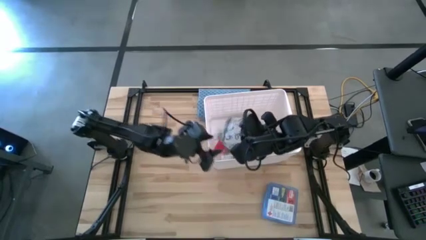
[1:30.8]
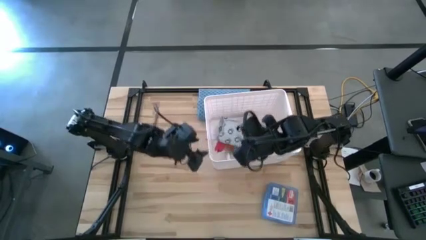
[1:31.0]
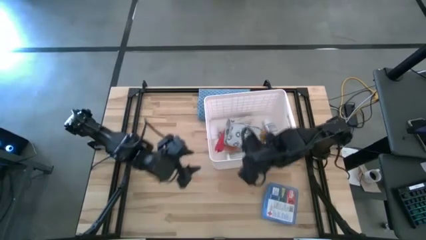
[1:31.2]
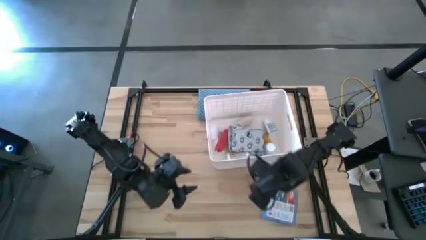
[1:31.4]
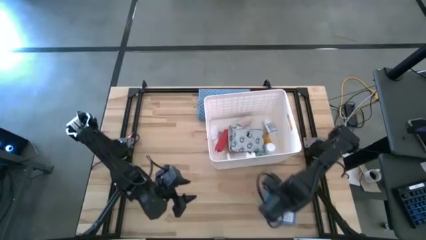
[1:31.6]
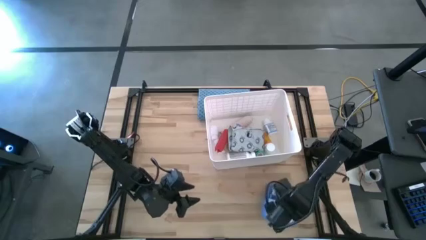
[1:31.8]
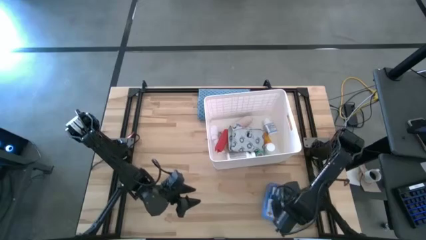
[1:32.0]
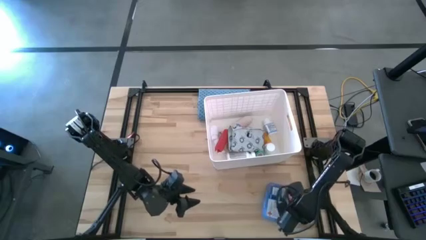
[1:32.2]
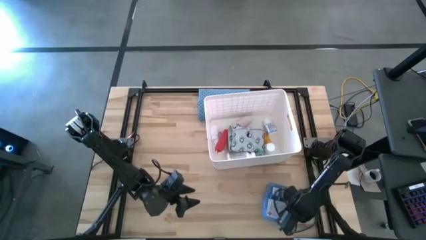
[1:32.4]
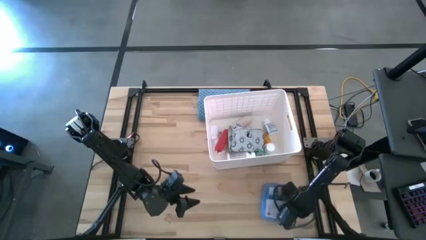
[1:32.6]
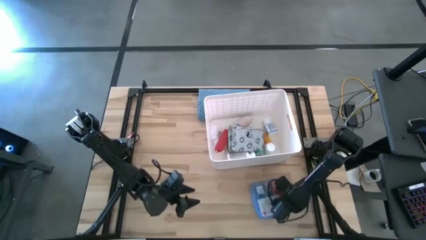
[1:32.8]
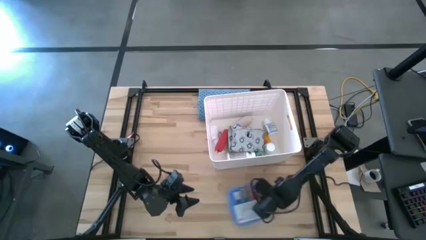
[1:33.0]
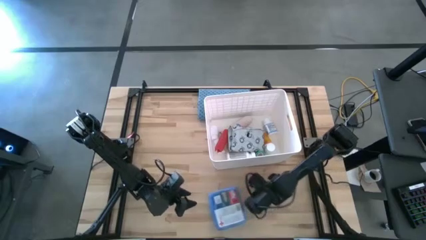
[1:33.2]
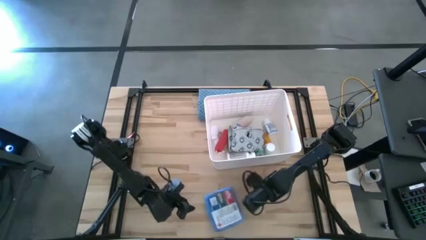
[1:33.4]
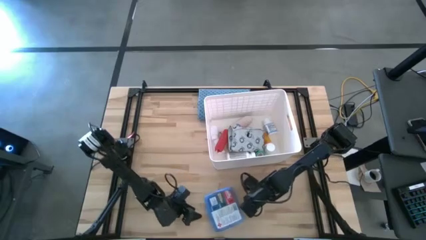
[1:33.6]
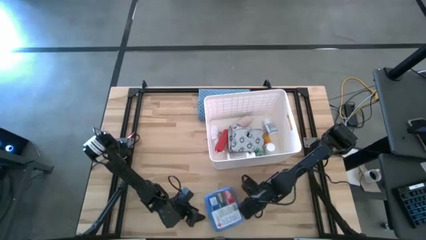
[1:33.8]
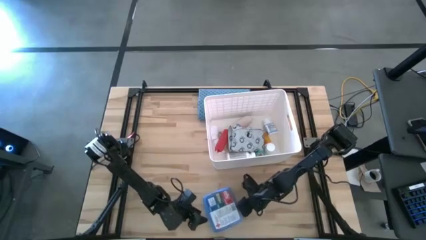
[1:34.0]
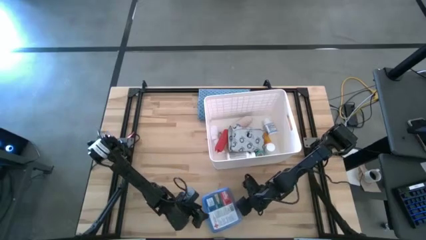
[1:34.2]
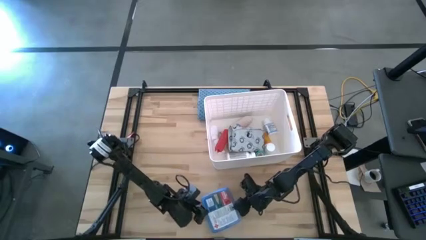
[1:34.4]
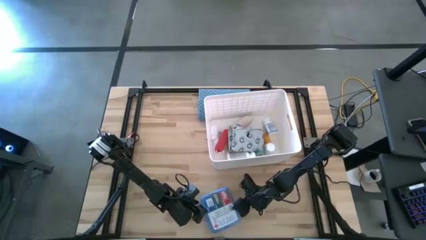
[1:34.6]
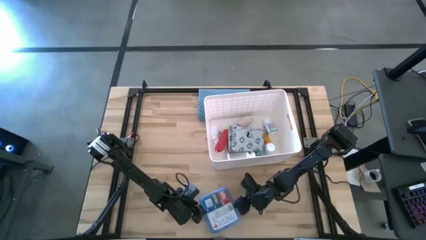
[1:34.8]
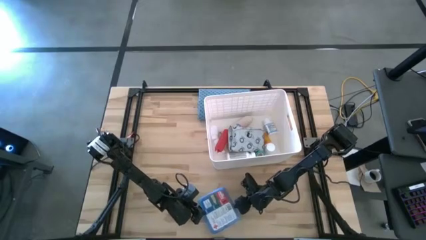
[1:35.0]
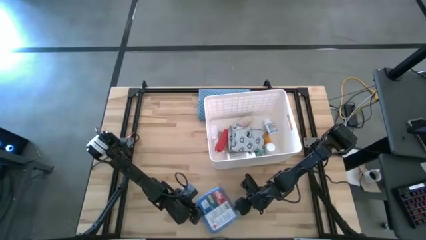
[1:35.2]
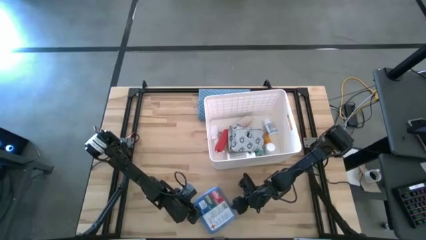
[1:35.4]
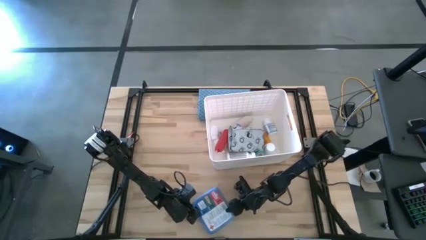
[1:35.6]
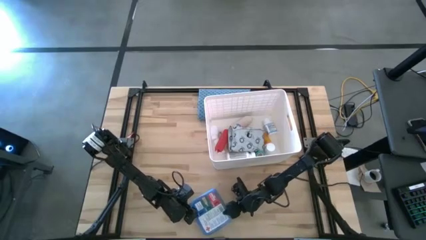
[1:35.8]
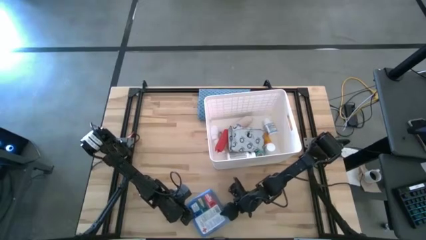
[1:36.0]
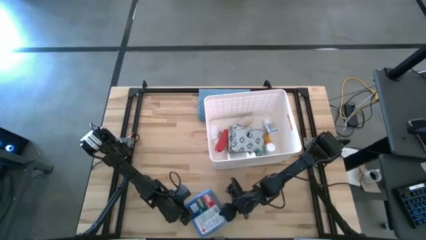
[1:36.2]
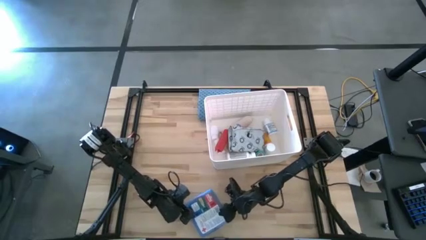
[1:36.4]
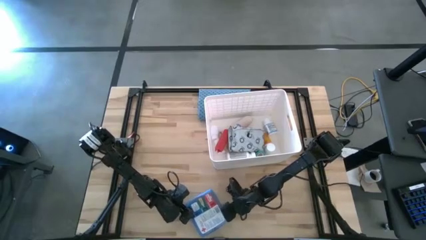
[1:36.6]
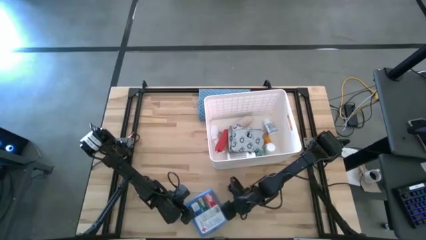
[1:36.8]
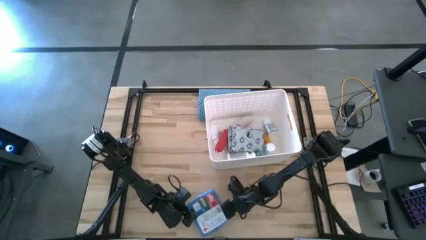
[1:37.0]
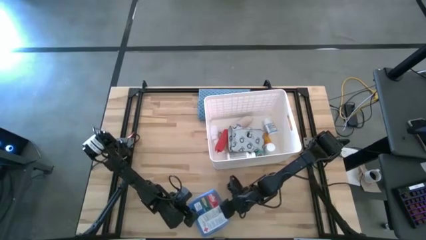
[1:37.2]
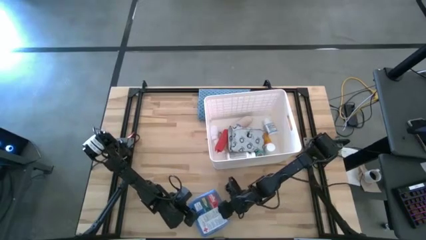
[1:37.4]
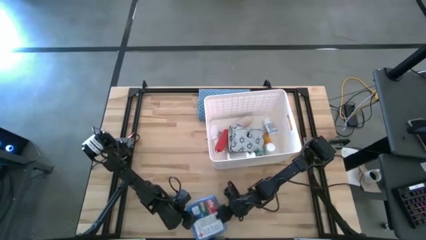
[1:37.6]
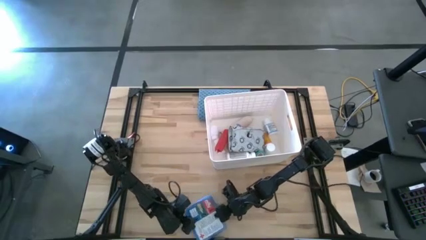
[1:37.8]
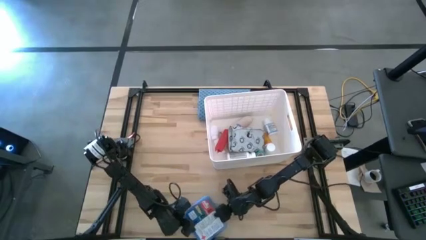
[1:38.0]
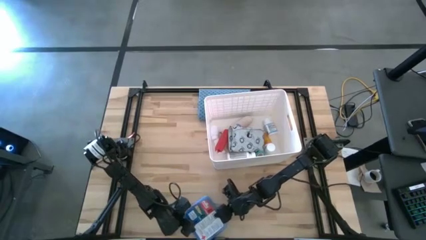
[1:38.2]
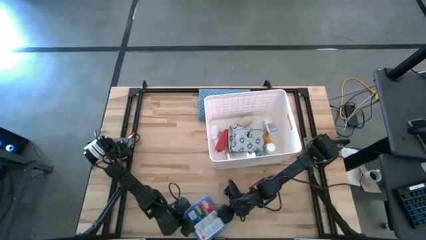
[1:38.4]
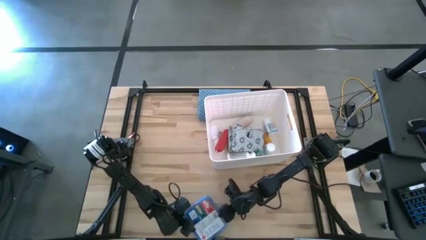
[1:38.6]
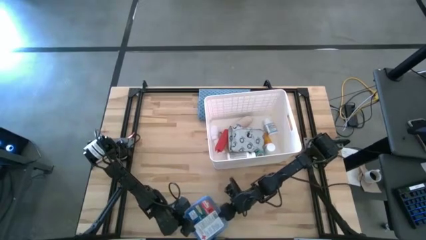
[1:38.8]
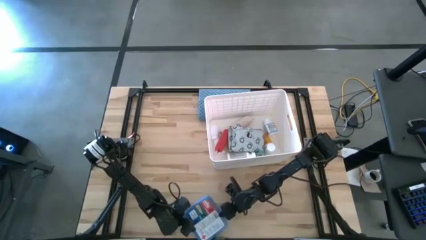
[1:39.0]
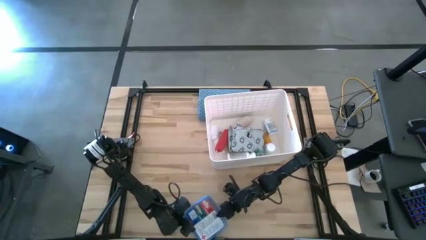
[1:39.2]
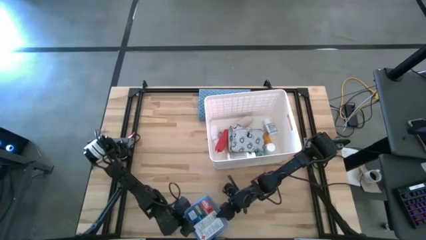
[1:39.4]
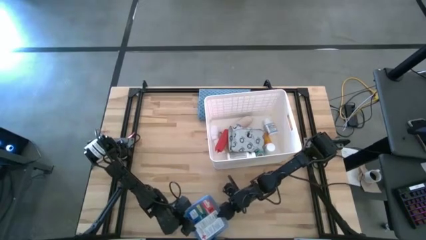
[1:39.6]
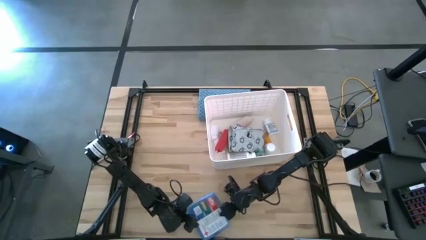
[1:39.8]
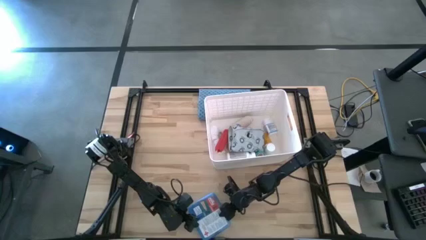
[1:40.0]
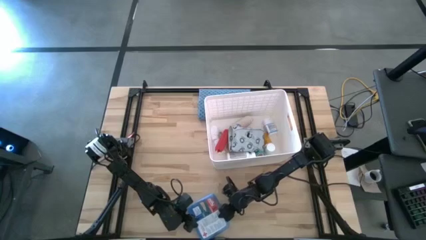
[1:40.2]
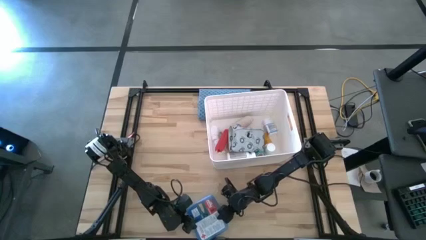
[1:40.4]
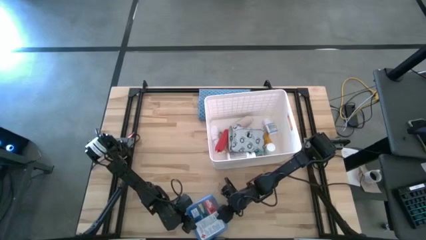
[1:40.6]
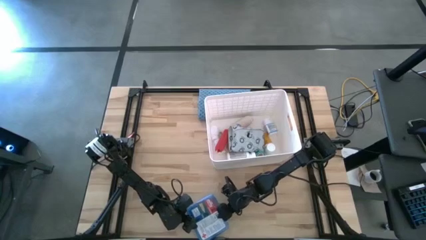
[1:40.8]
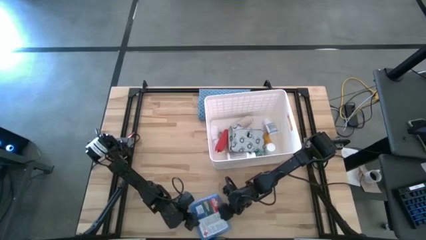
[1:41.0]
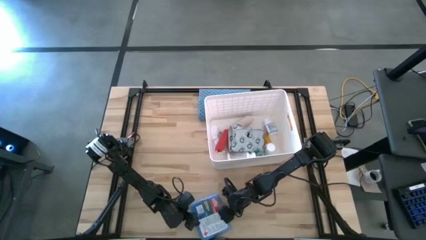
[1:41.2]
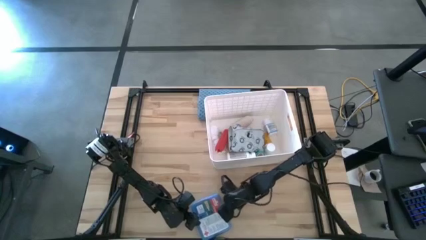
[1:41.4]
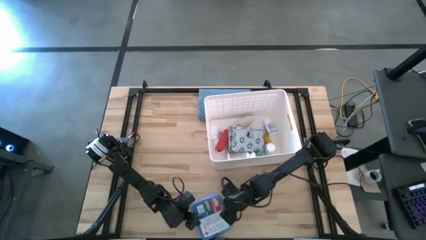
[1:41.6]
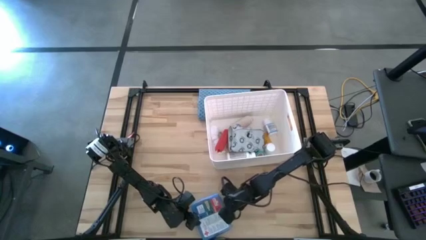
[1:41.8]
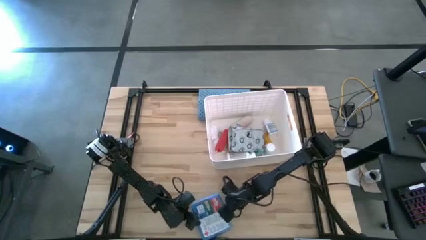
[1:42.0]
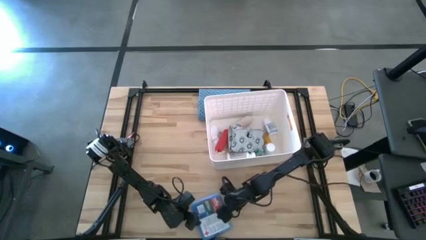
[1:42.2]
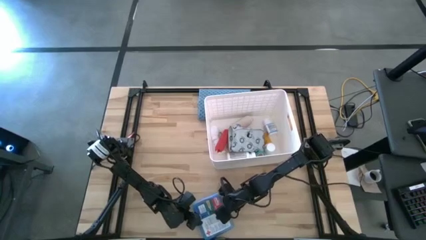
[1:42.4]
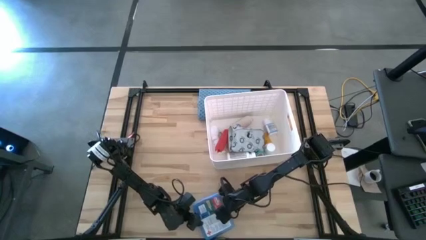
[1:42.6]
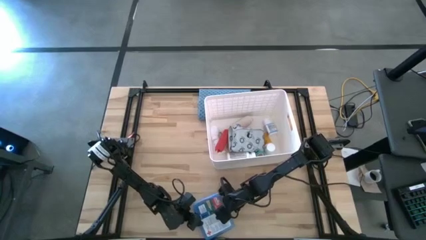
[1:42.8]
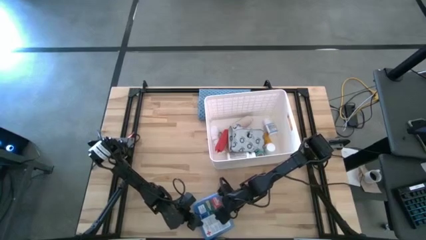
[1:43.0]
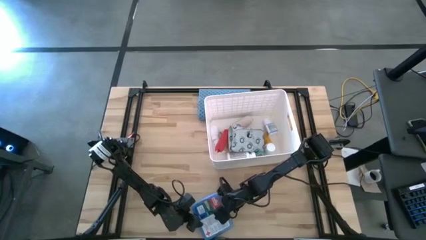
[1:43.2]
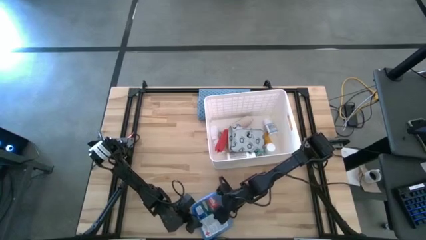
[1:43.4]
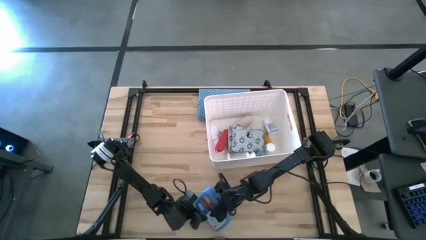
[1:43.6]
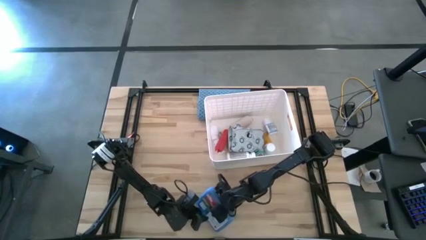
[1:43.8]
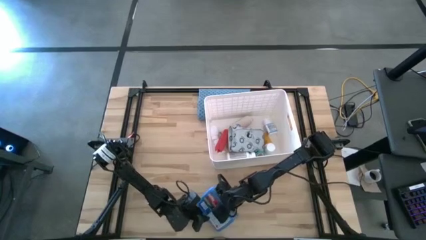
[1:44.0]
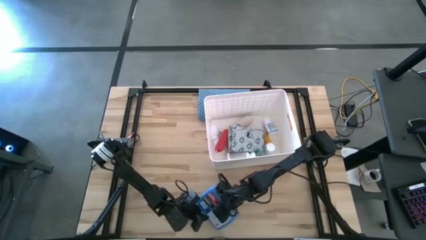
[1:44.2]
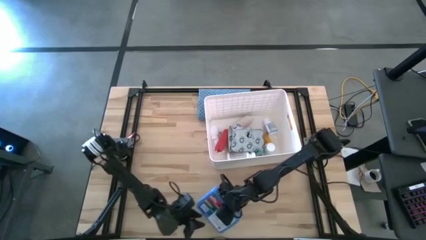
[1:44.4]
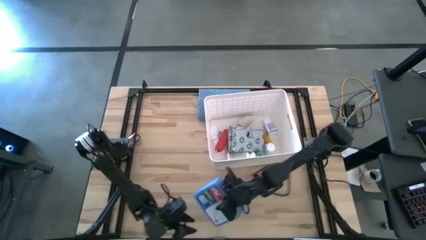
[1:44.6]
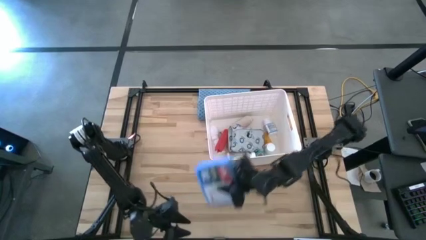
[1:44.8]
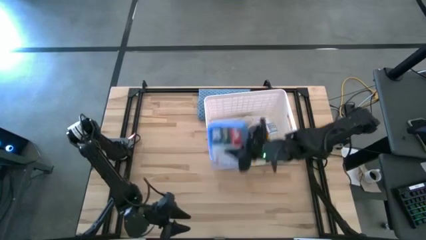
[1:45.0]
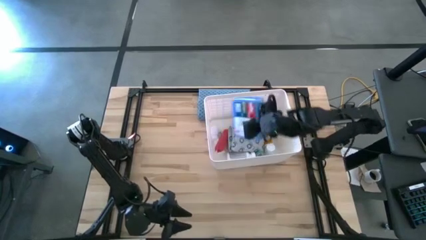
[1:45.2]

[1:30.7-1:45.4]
Task: Pick & place medical supplies in basket/bin
Put the blue first aid kit into the white bin

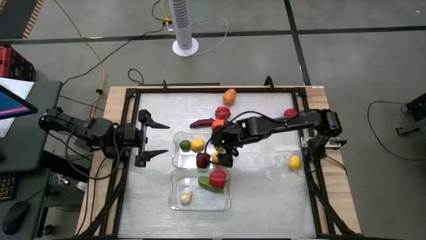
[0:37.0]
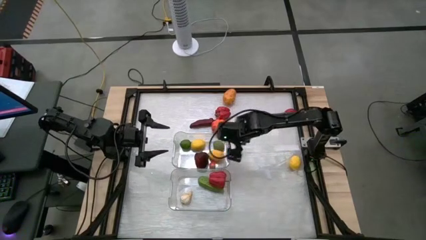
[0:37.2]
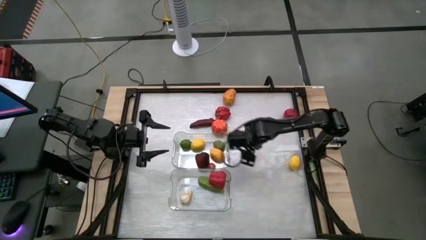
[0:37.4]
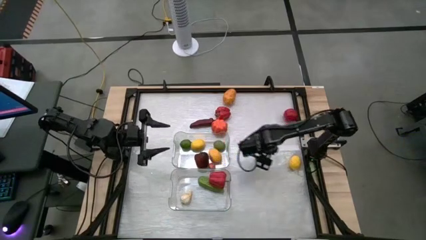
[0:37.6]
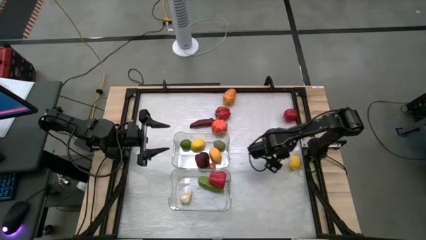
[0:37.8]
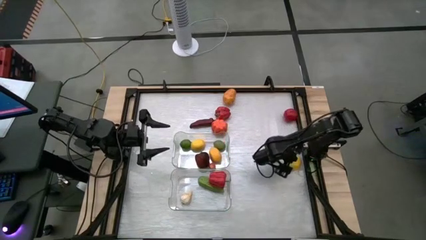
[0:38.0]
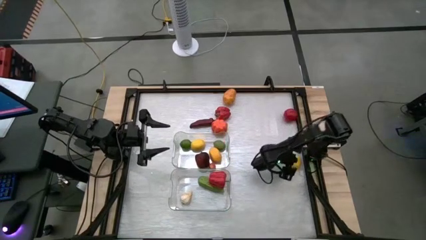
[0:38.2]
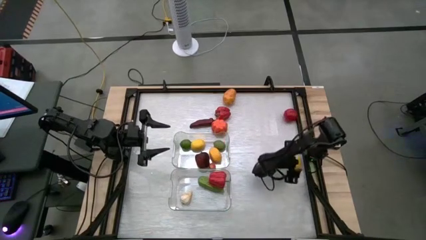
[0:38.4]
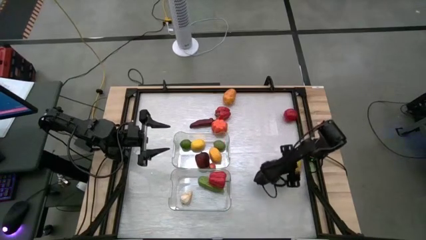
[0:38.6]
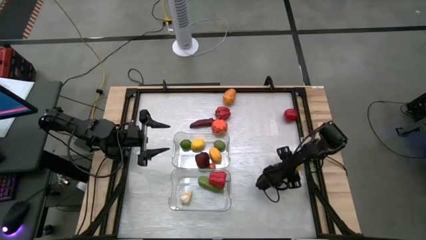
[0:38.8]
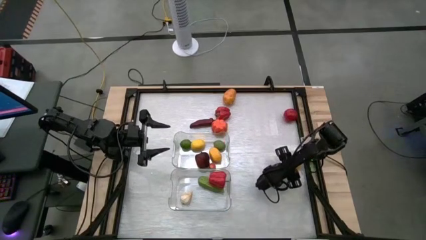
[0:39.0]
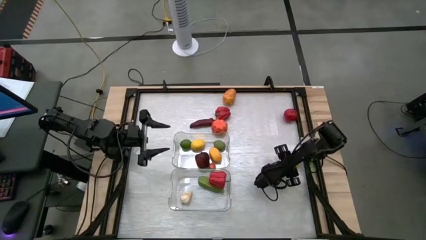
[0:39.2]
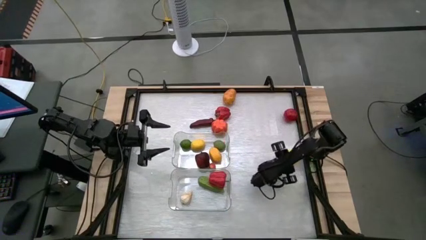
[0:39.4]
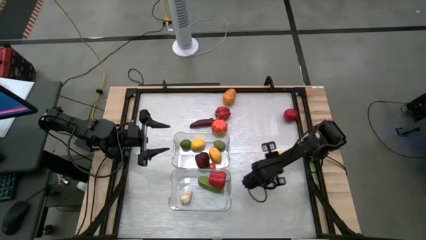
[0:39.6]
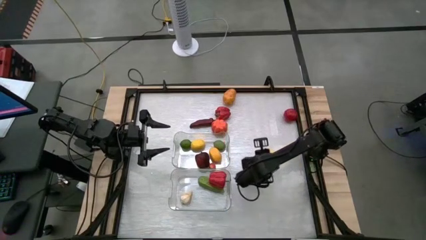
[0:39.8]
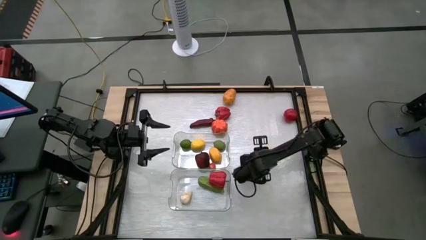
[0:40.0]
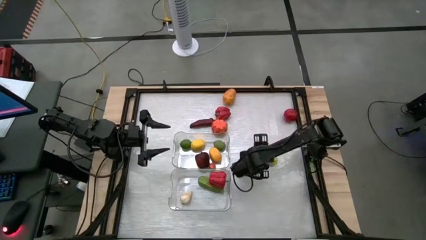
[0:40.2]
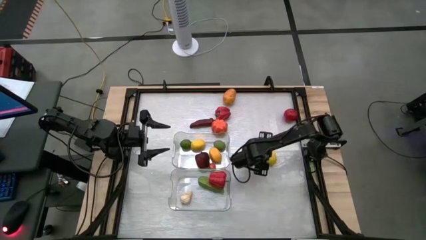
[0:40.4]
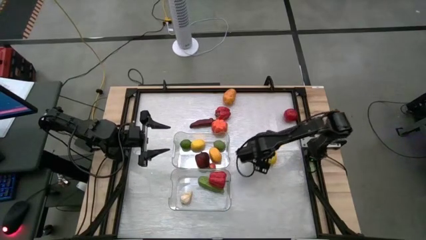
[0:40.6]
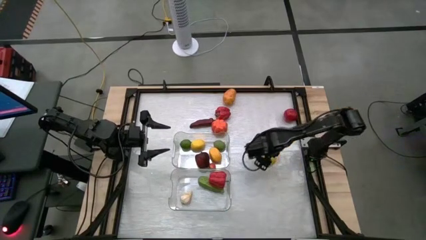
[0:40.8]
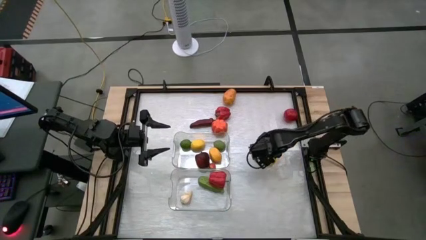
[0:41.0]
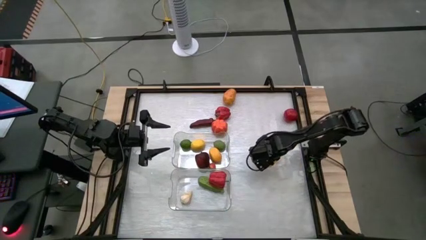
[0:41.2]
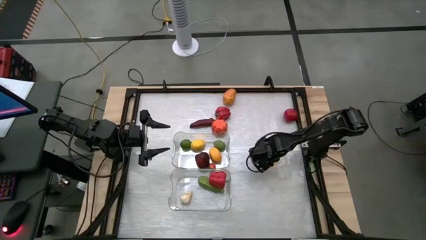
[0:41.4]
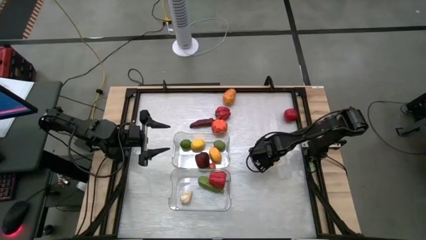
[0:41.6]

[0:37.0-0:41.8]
Task: Sort produce into baskets
Put the lemon into the top transparent bin
